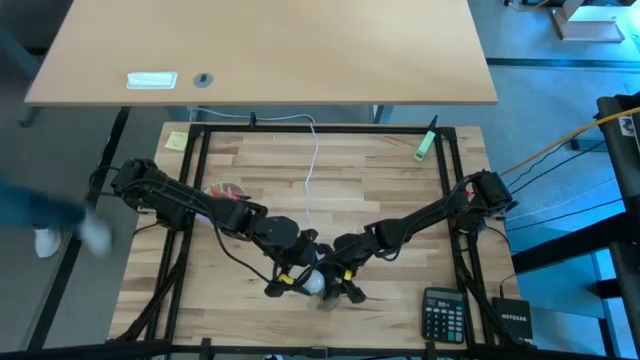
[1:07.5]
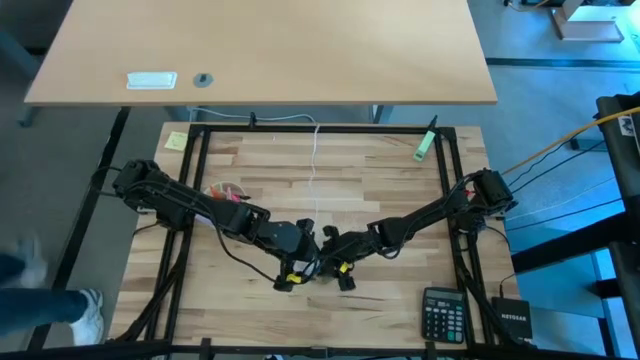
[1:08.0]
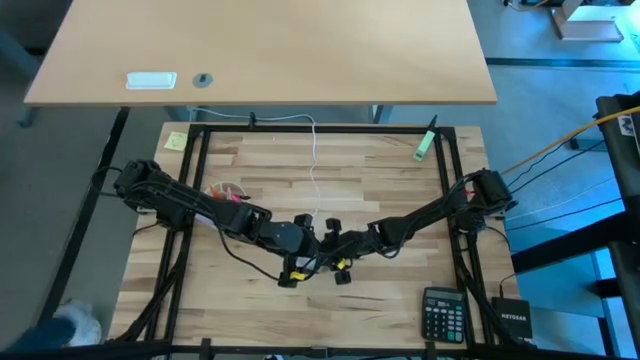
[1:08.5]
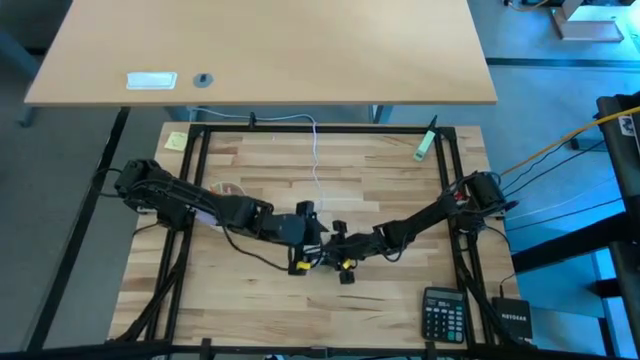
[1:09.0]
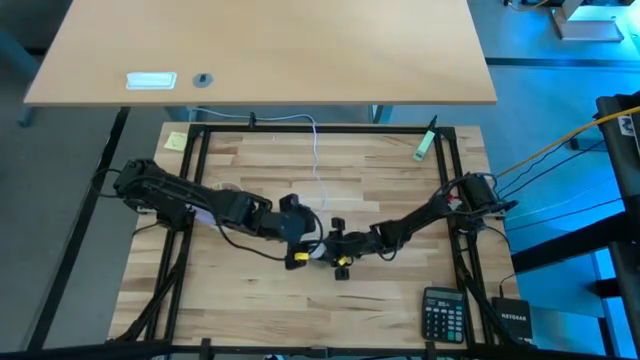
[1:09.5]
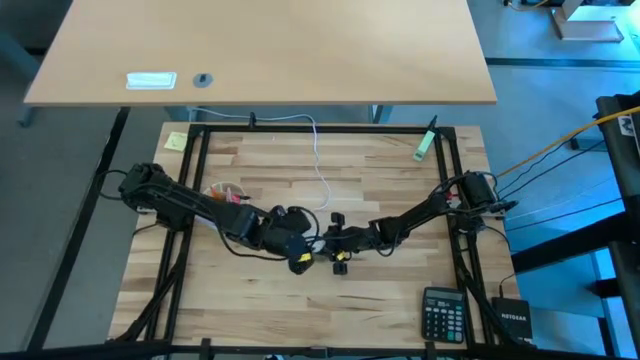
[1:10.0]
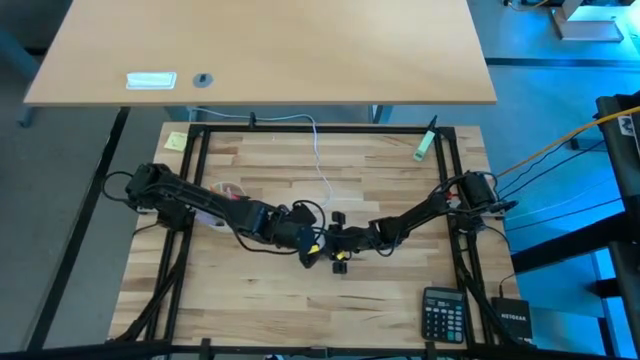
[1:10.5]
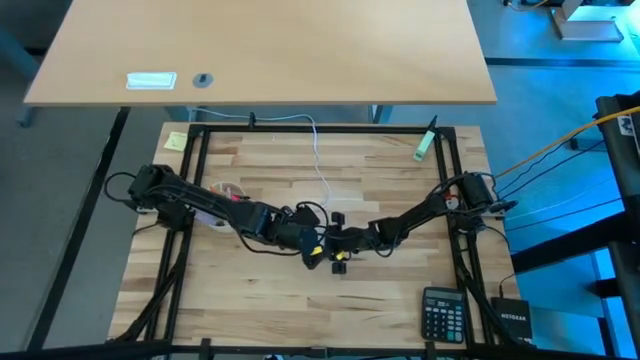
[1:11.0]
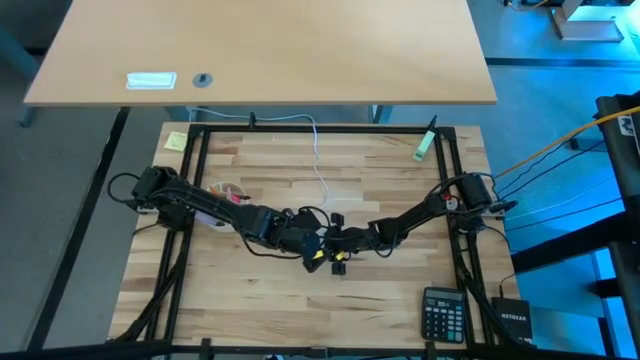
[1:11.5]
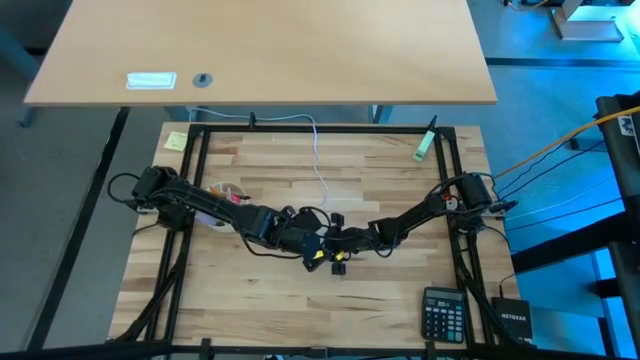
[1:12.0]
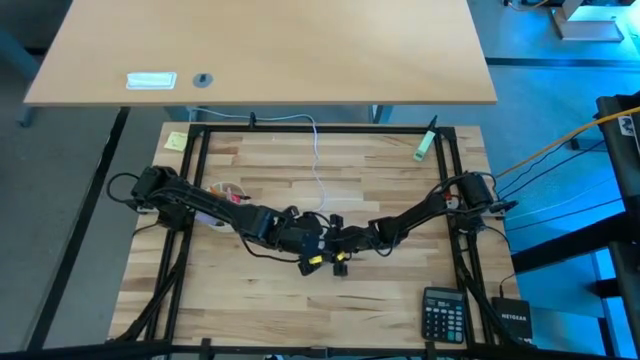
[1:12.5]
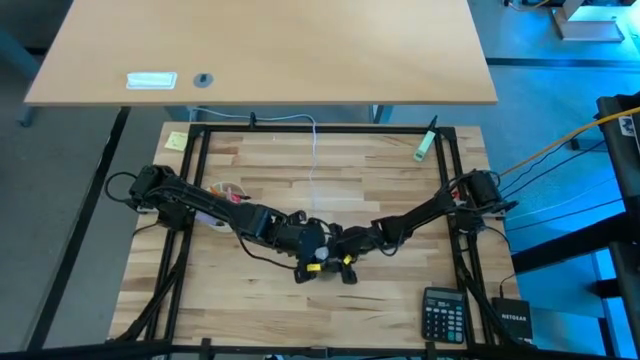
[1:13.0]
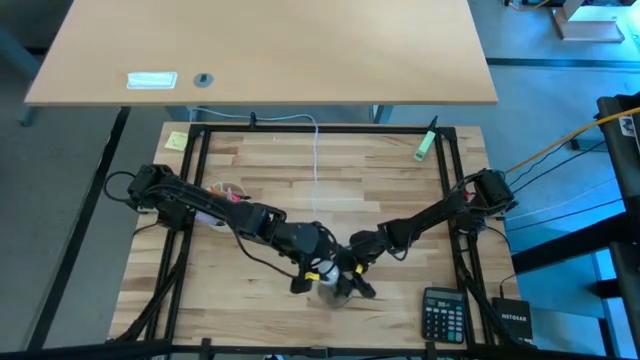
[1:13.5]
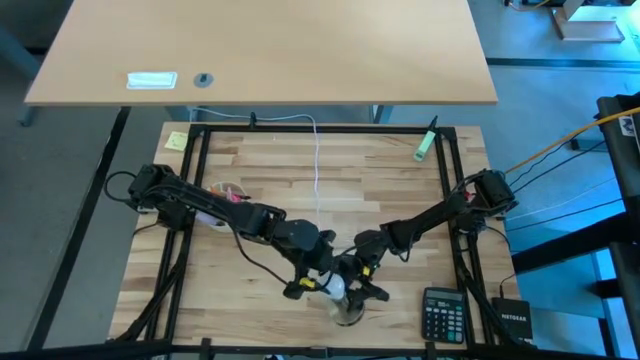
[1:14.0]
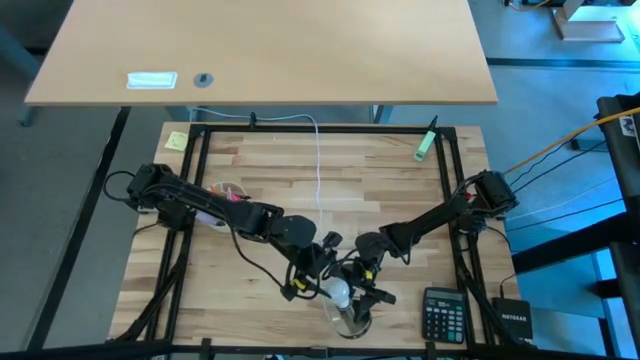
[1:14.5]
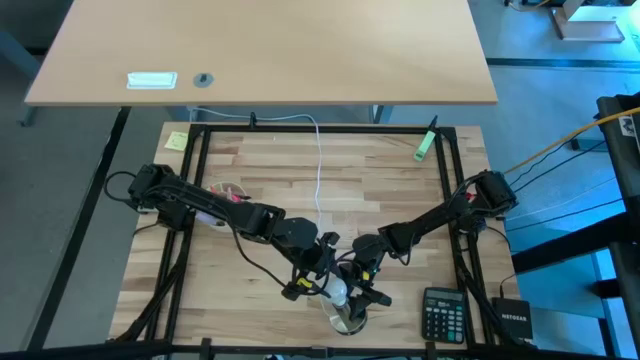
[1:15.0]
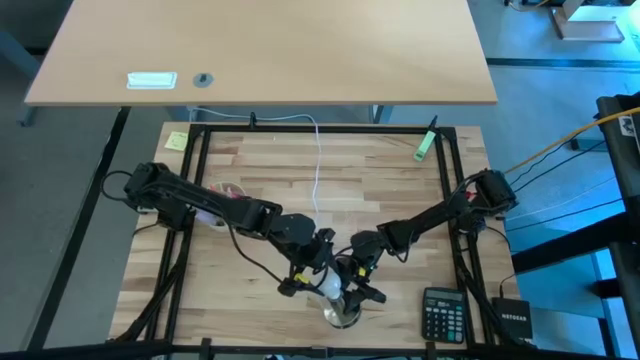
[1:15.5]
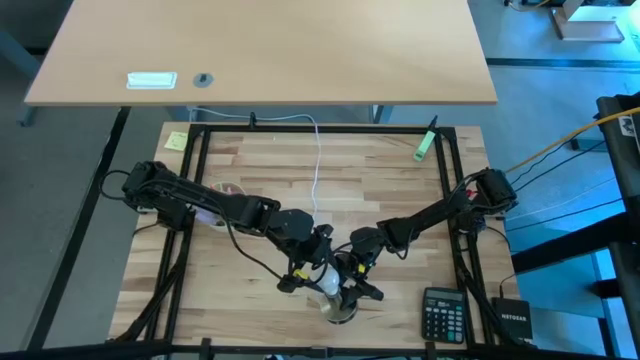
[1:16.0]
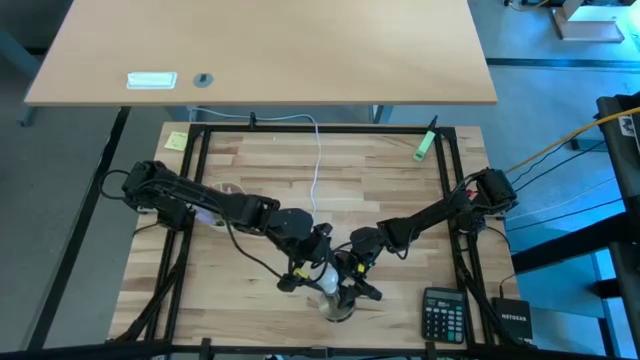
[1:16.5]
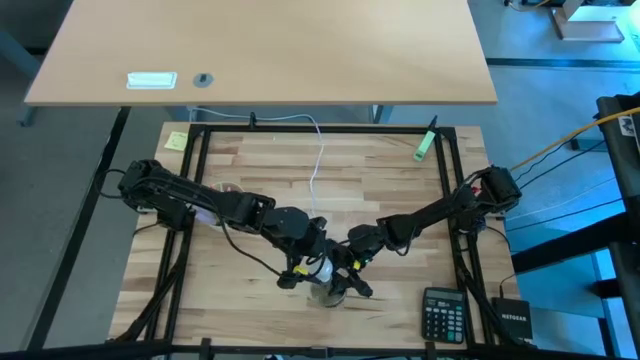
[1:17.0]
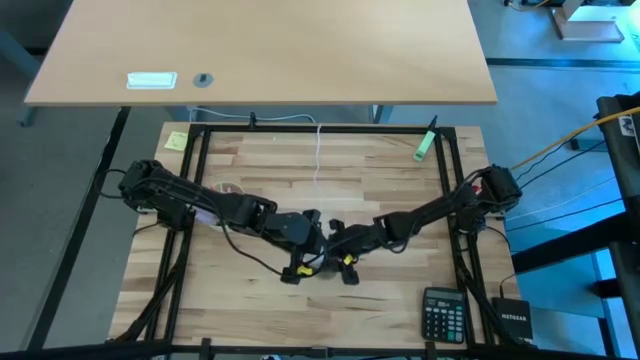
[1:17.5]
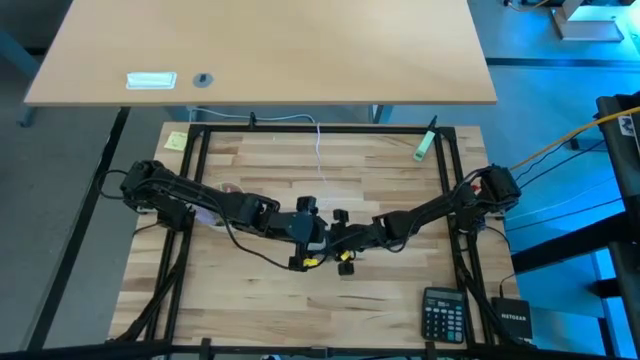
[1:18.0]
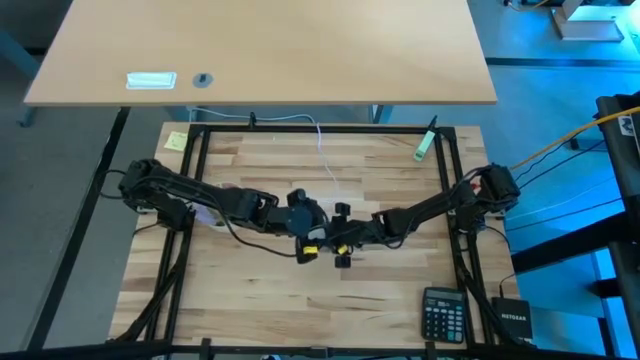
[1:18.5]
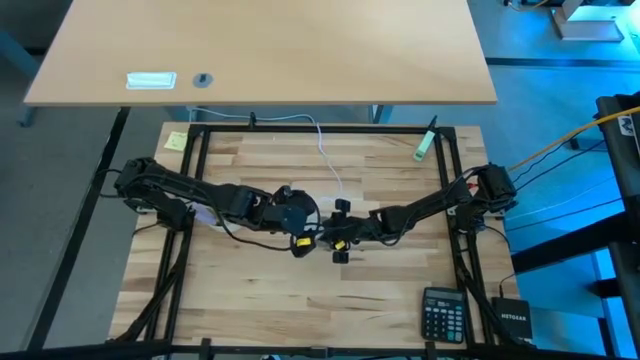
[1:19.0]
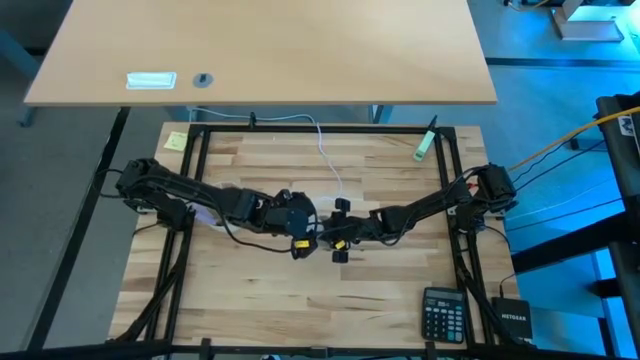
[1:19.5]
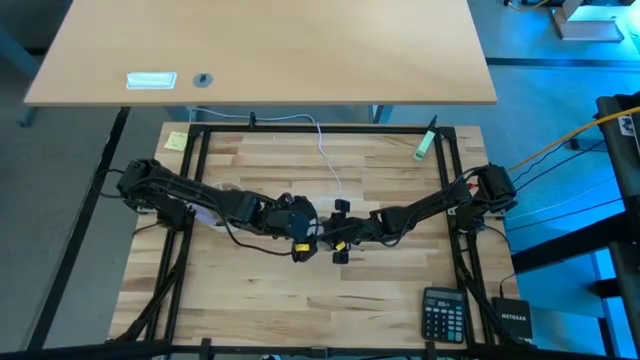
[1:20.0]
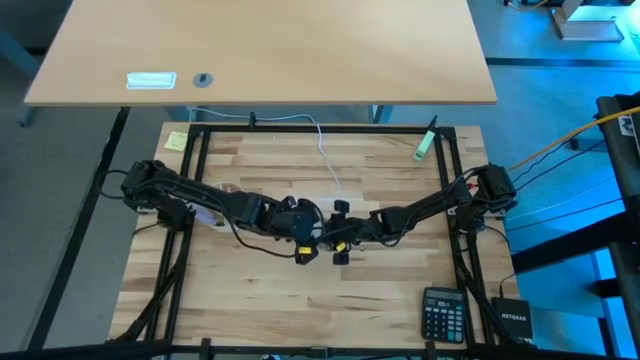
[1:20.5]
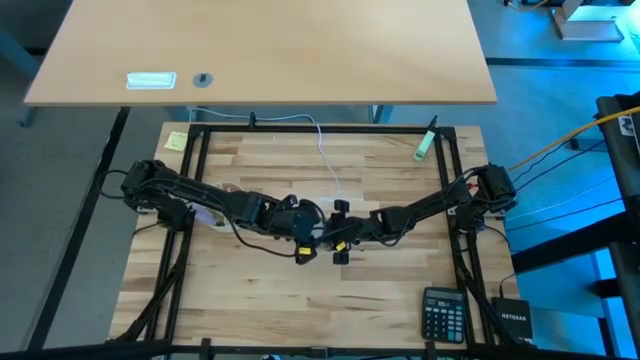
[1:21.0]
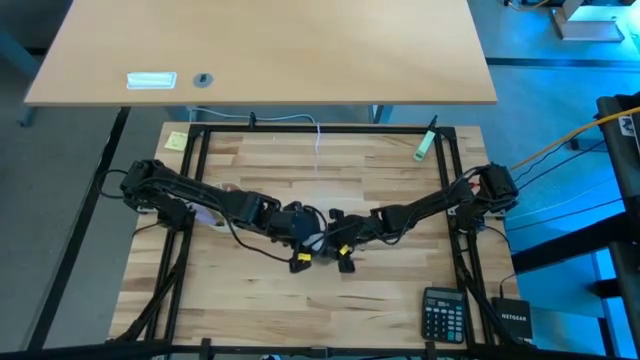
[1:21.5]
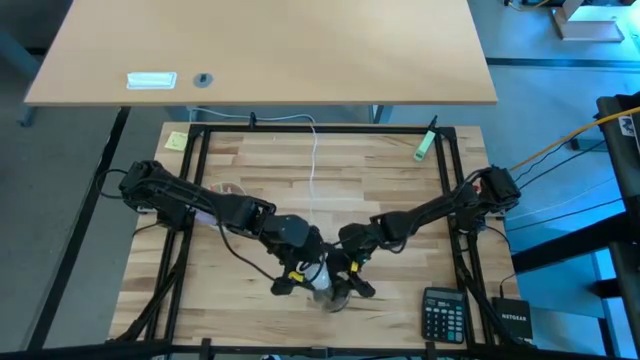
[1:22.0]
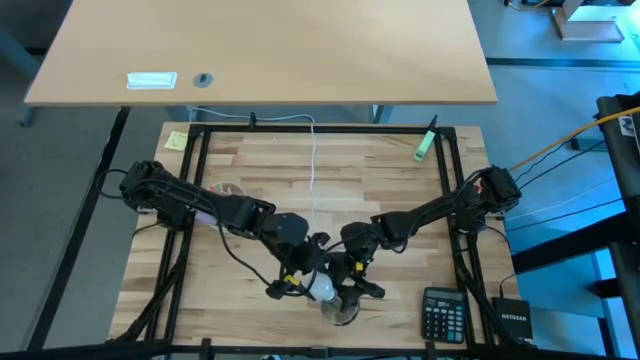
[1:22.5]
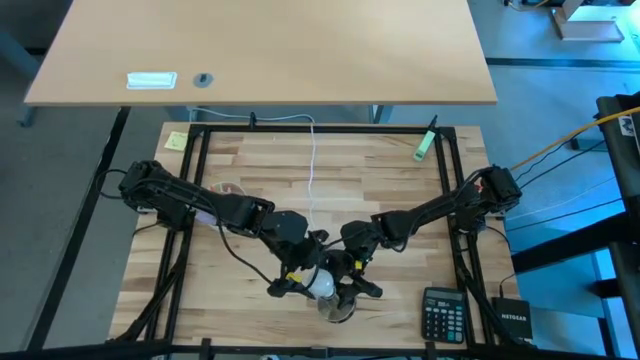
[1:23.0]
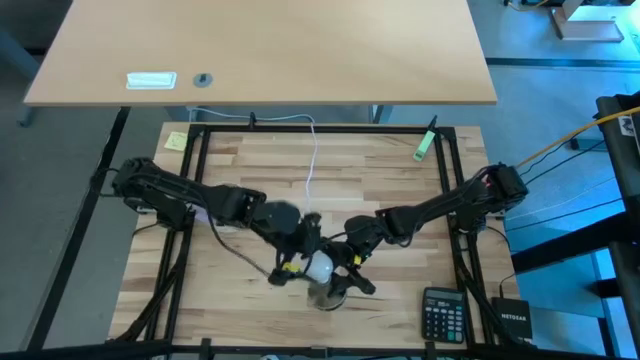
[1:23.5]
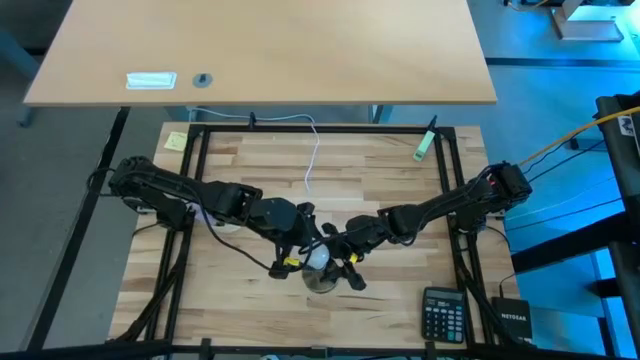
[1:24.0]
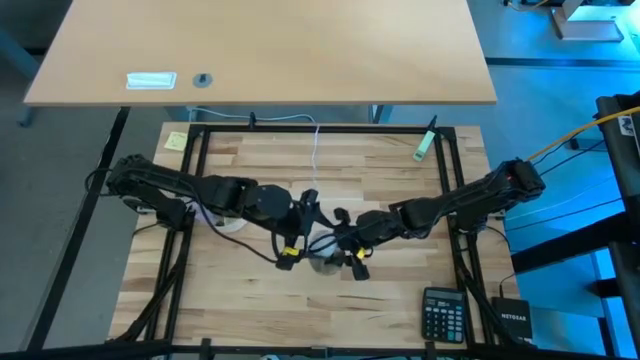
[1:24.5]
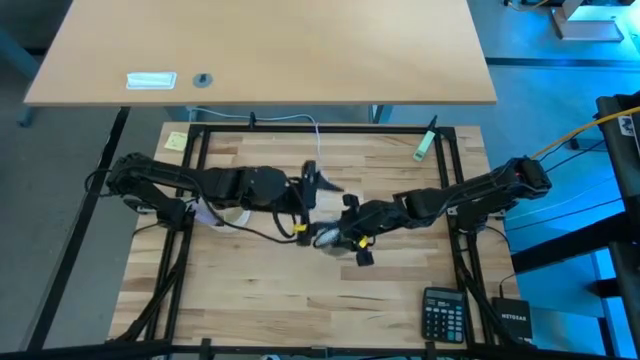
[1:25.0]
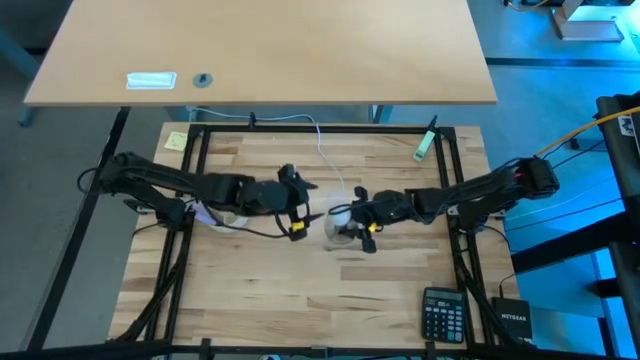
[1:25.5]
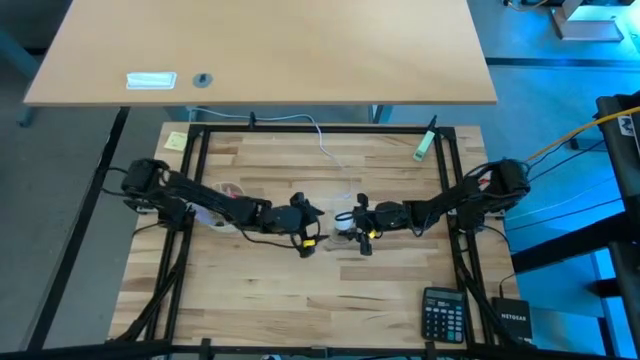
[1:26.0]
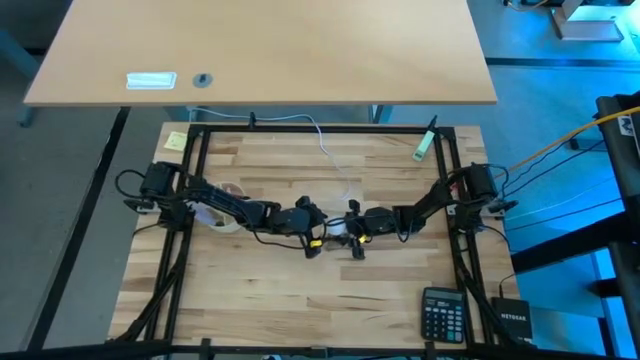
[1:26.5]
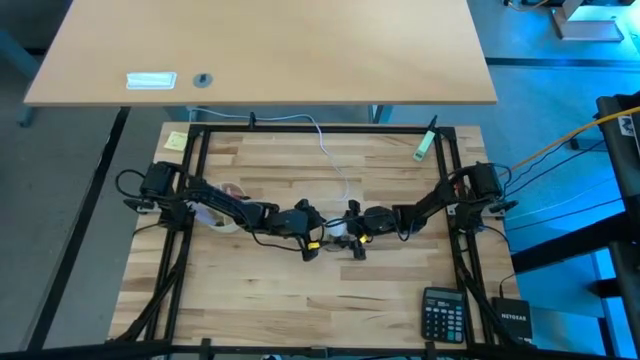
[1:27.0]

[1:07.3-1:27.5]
Task: Screw lightbulb
Insert the lightbulb into the lamp
